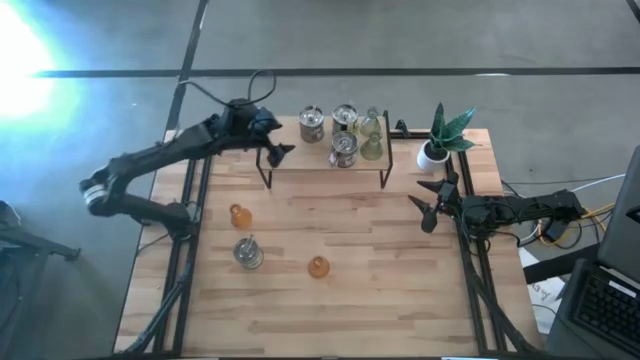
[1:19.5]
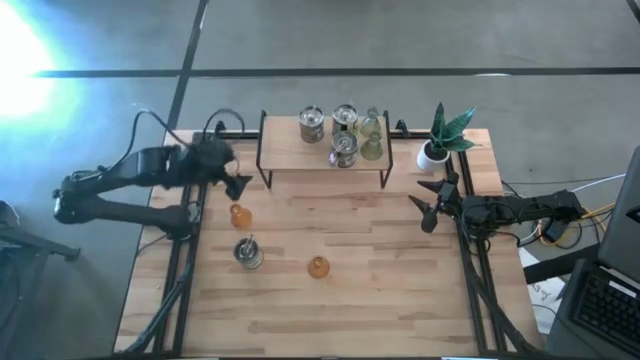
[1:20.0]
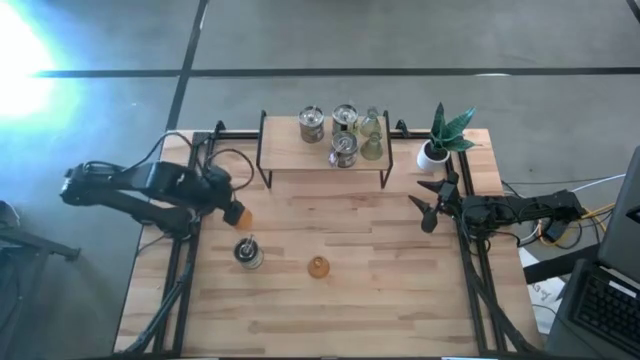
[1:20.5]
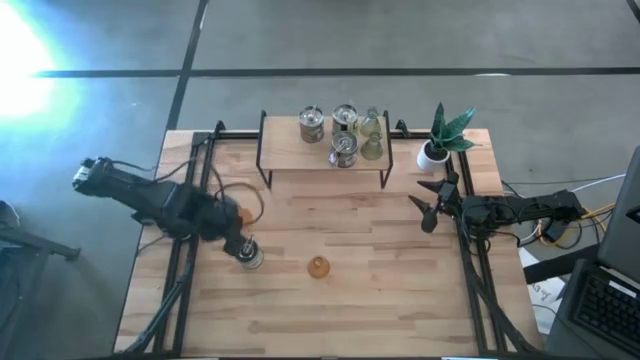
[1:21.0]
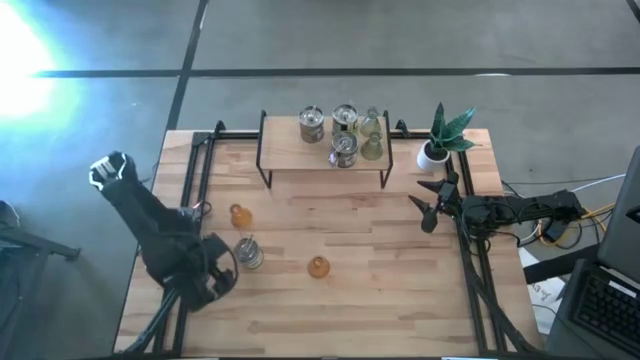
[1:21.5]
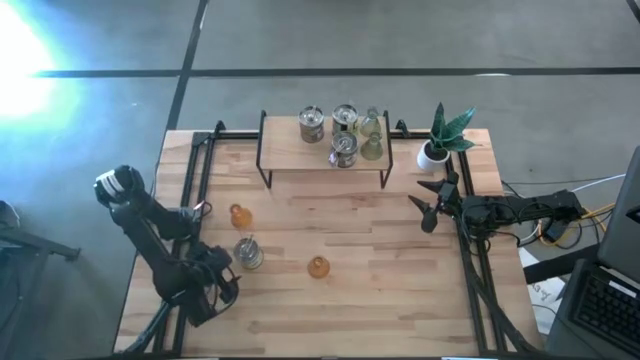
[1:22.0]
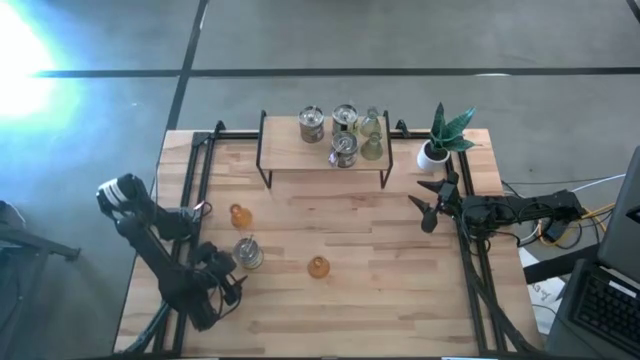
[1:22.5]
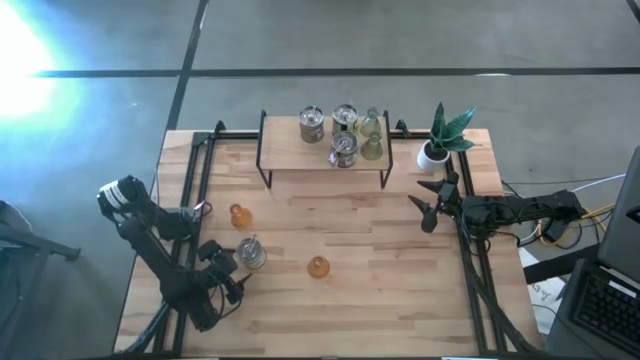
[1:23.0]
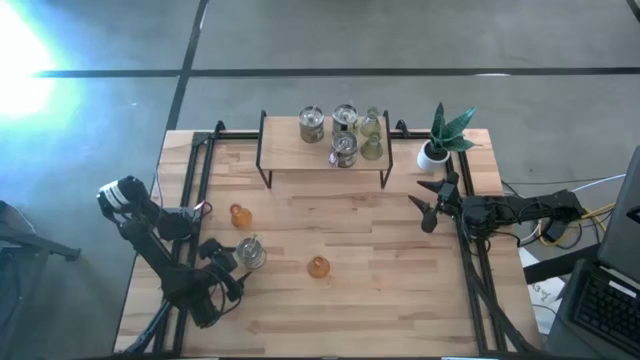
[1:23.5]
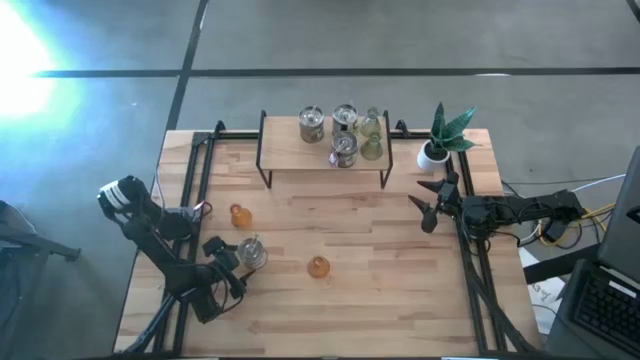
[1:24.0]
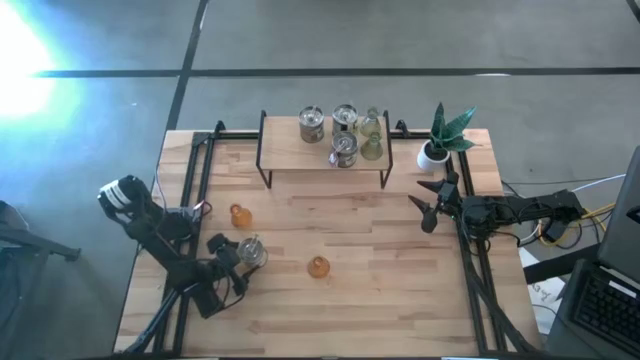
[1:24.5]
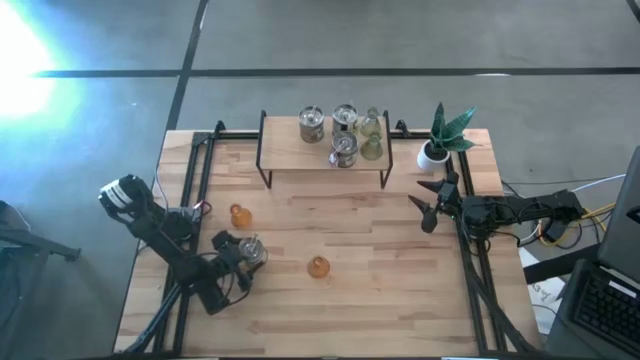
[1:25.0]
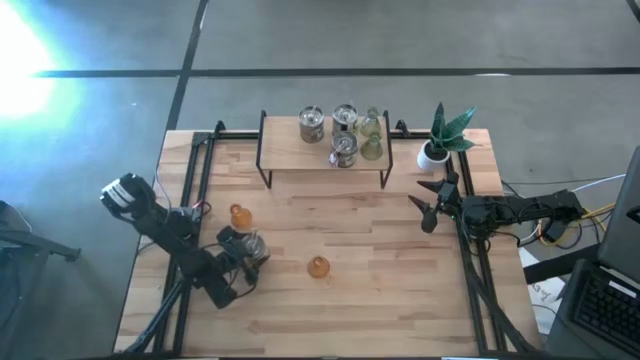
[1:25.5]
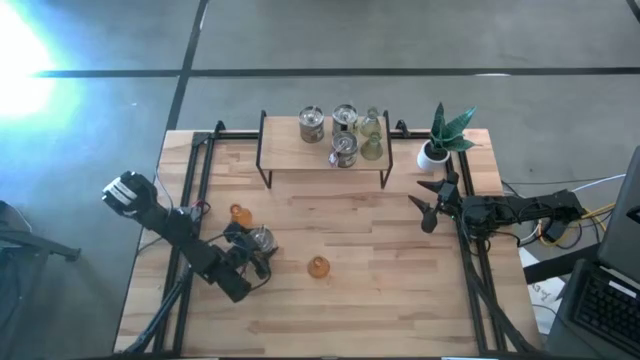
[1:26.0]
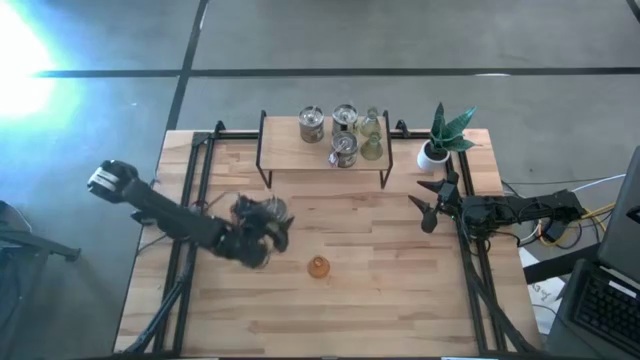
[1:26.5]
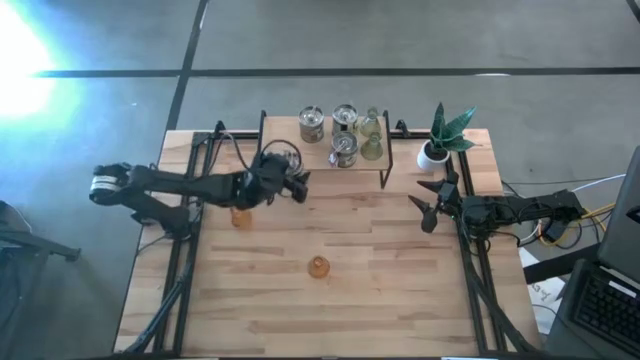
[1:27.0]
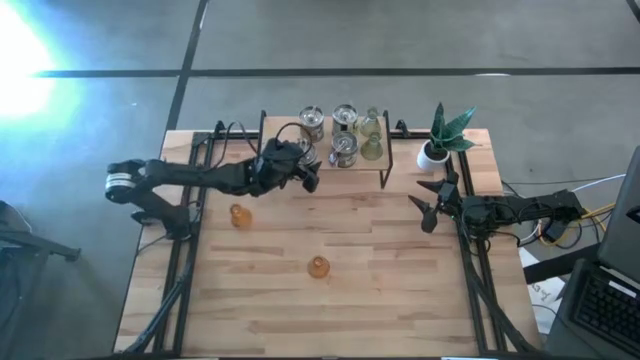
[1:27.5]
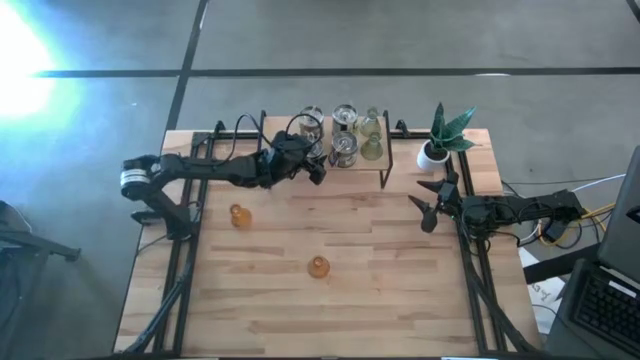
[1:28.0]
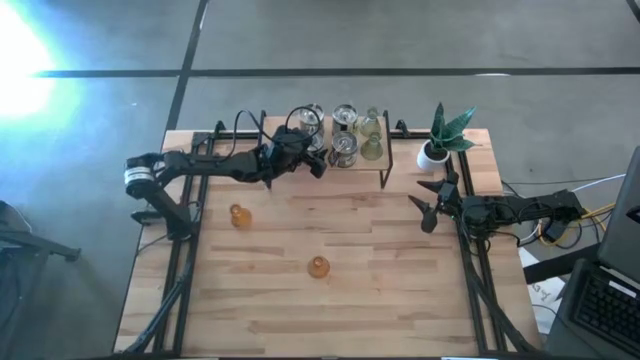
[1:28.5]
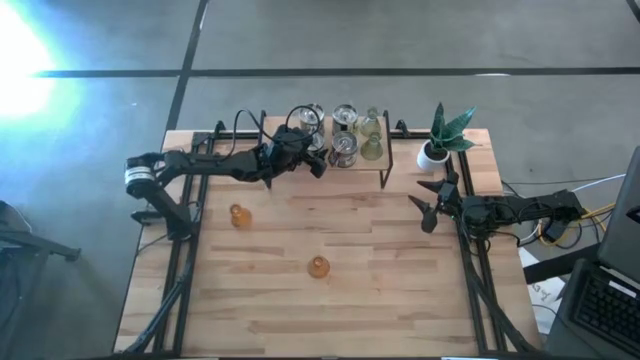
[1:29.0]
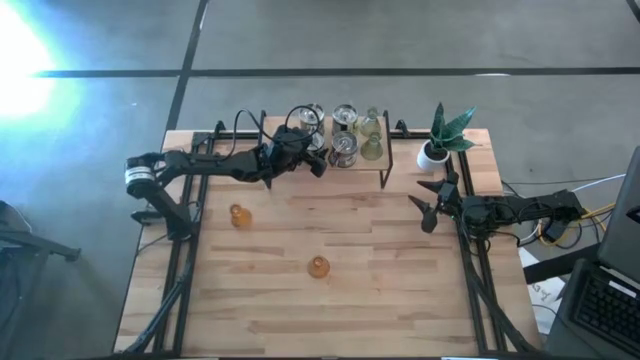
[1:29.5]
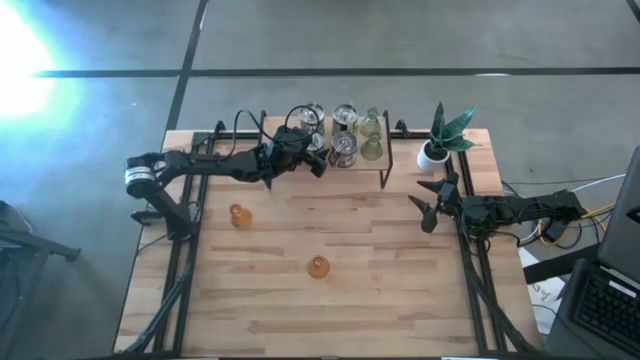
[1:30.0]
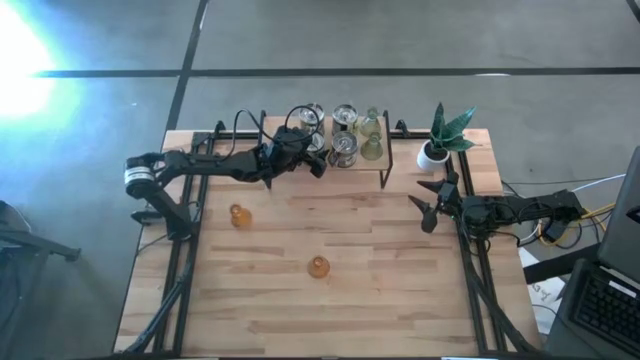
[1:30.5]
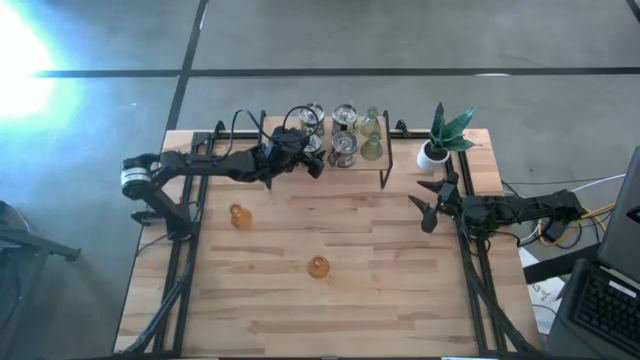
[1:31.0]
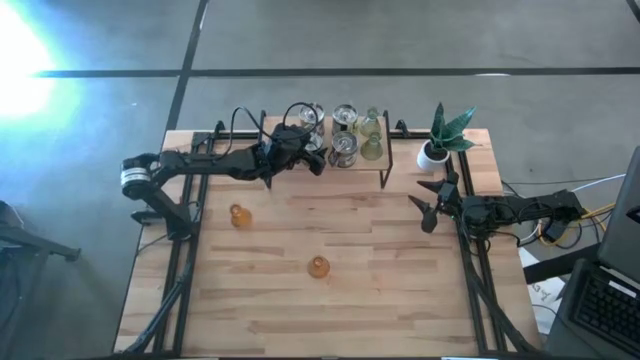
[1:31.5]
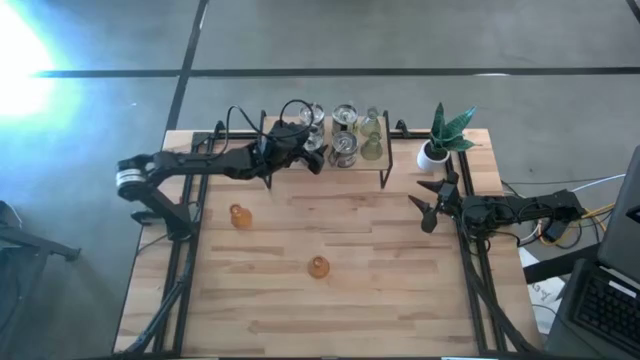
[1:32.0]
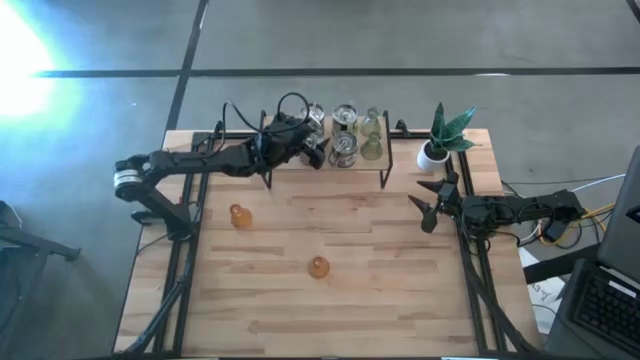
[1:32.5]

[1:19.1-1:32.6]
Task: Pick & Place candle stick holders
Put the green scented candle on the shelf

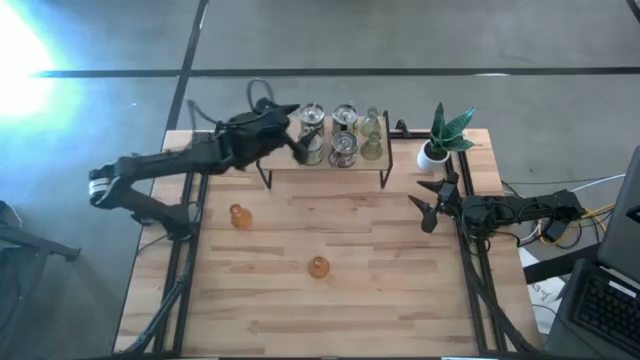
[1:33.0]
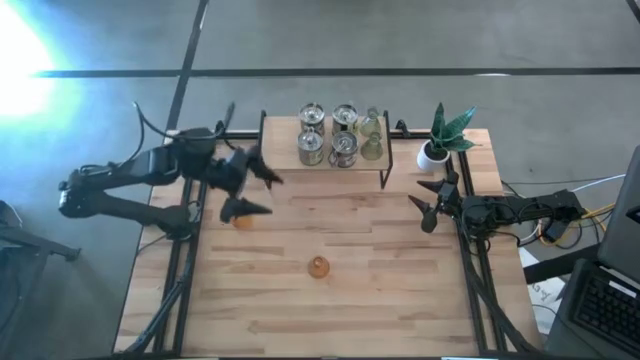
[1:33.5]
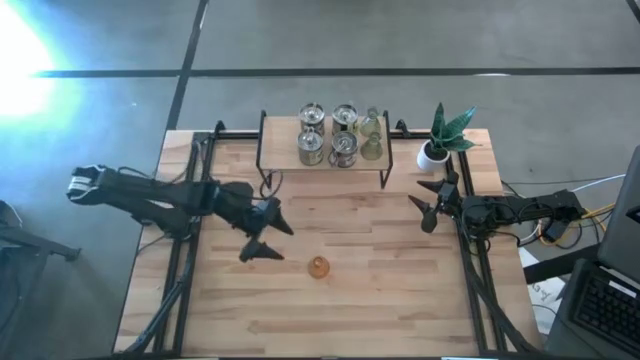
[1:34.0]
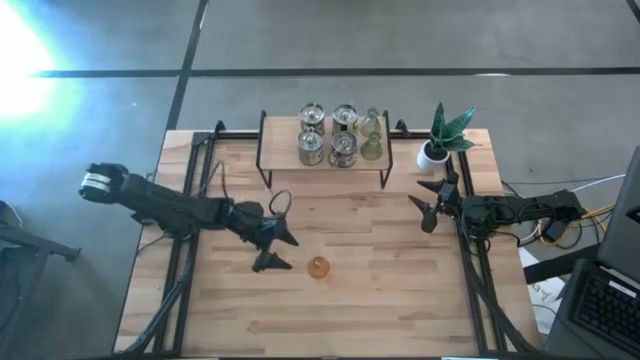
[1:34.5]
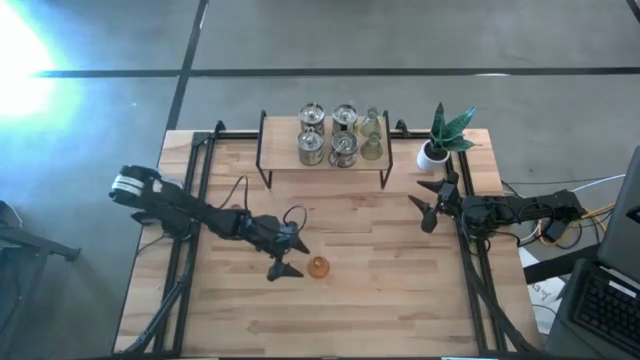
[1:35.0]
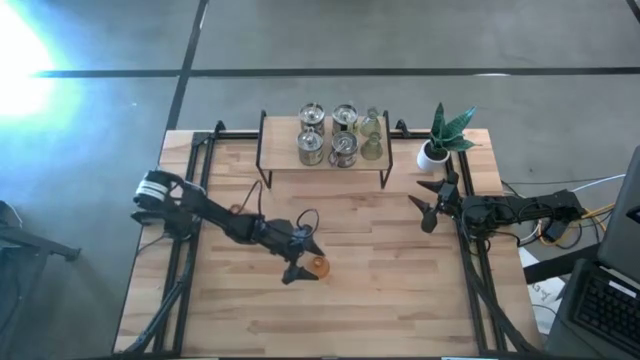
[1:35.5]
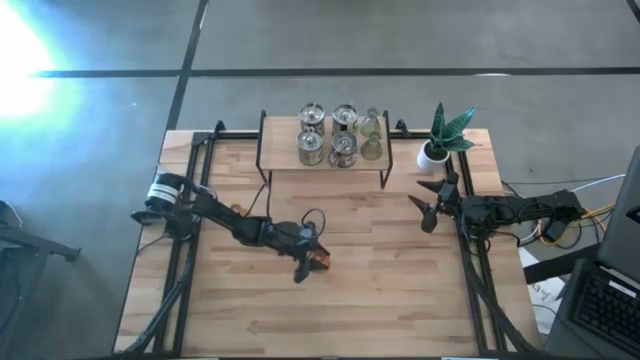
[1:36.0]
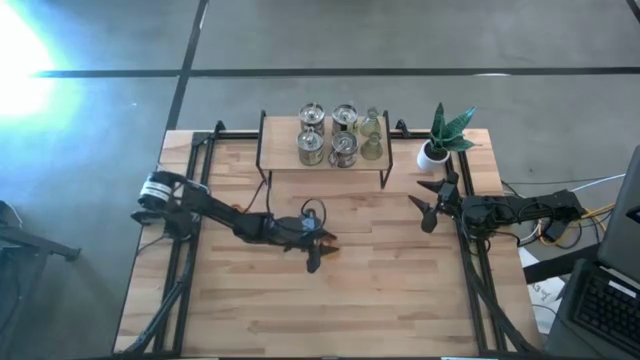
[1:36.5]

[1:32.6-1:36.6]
Put the right orange candle holder on the shelf

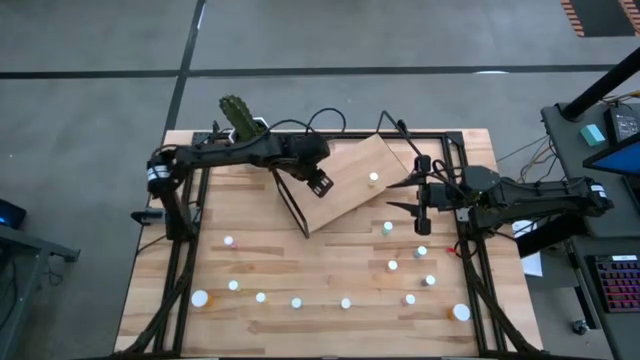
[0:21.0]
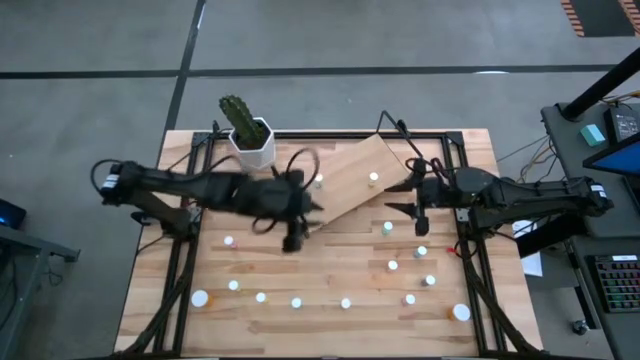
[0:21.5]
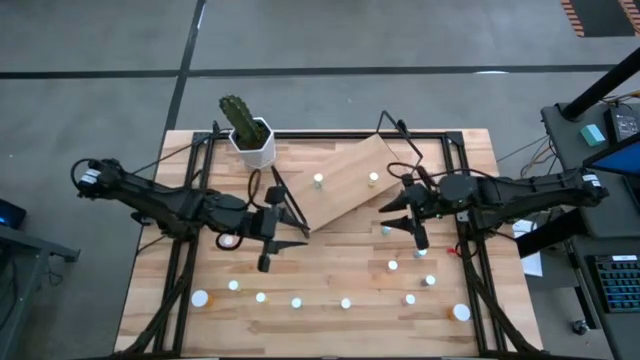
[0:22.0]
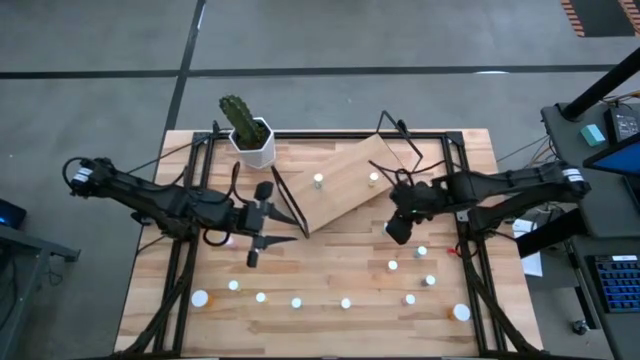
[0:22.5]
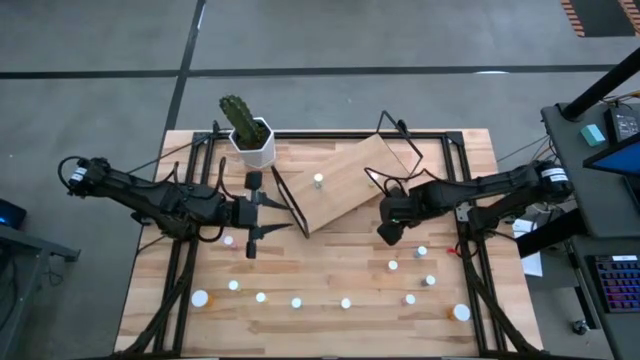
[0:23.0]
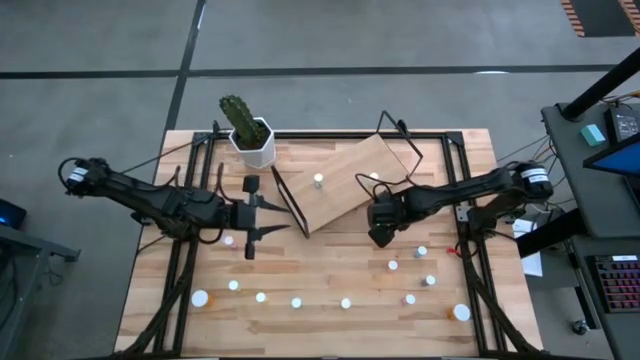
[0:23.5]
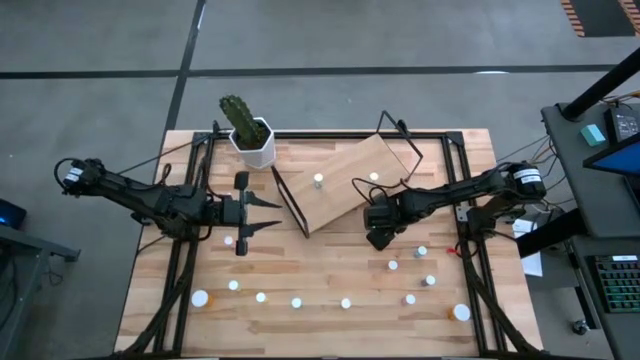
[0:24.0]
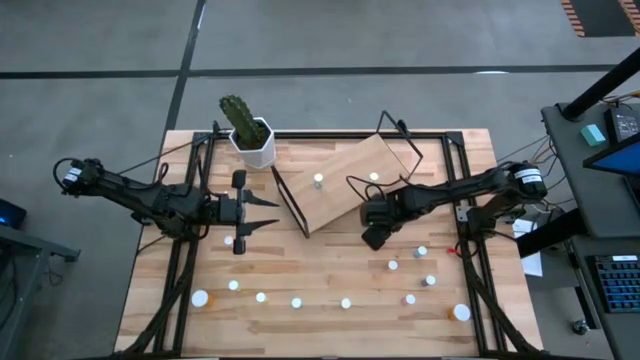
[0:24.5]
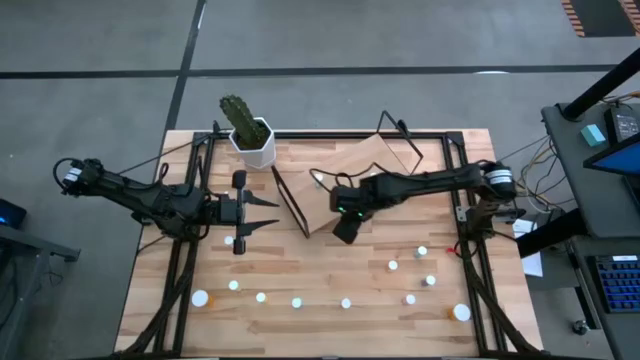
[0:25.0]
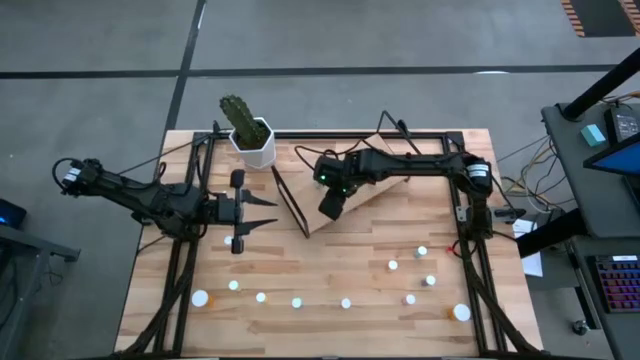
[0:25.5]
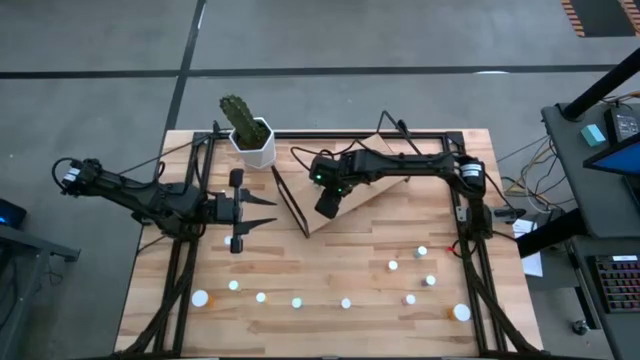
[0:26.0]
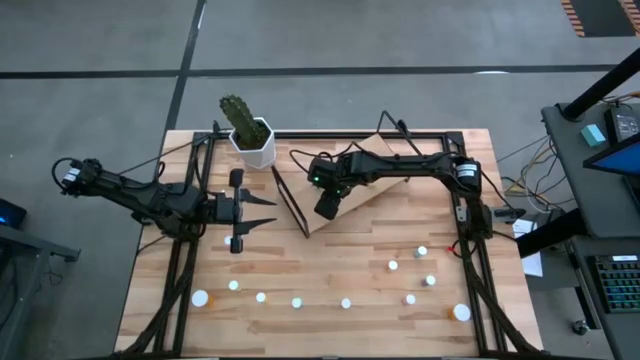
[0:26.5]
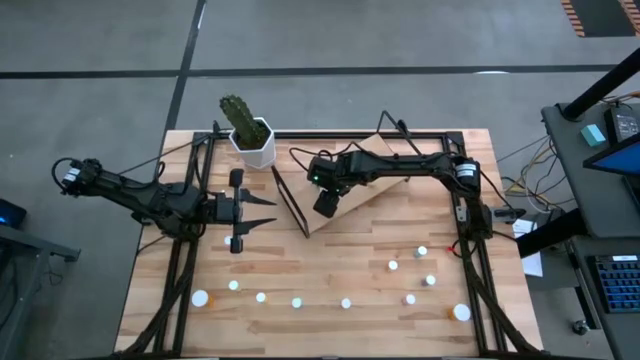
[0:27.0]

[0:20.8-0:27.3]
Task: Pick and place medicine bottles onto shelf by color
Put the green pill bottle on the shelf aligned with the other green pill bottle
